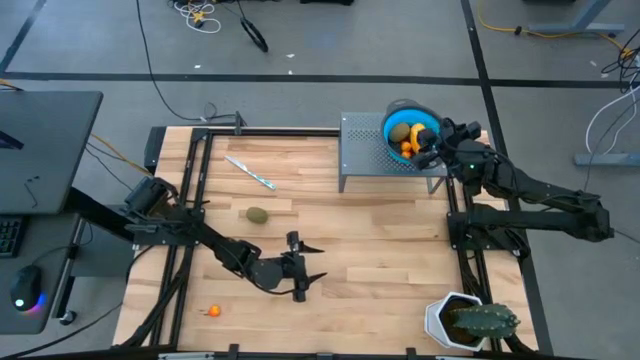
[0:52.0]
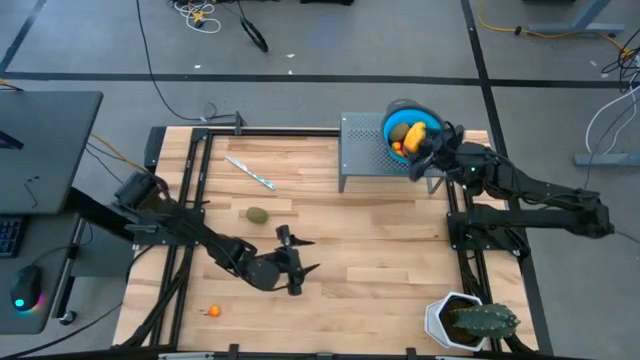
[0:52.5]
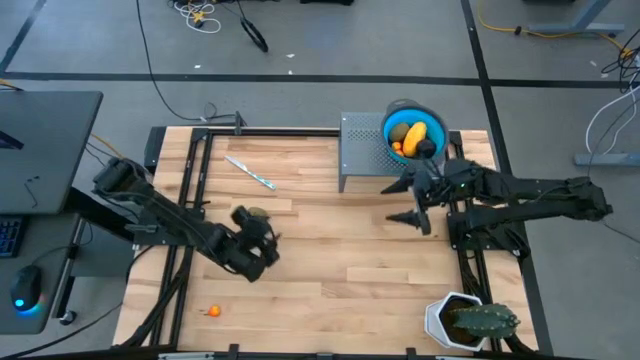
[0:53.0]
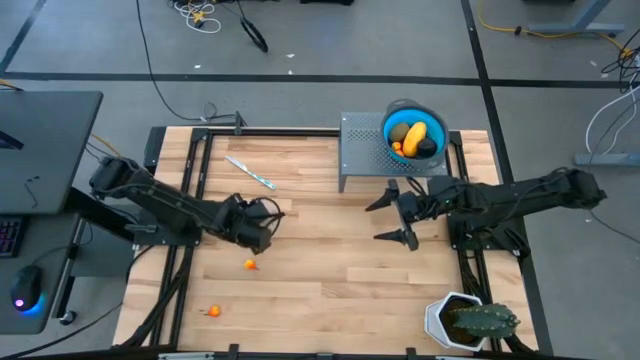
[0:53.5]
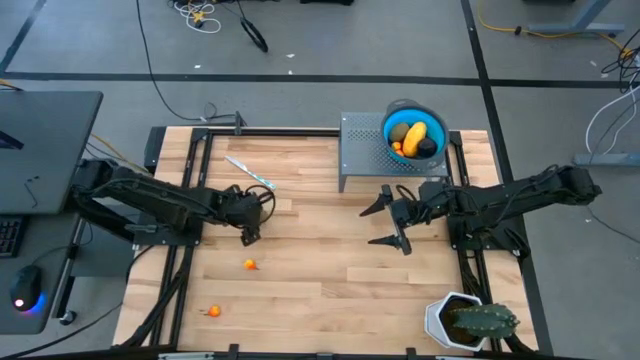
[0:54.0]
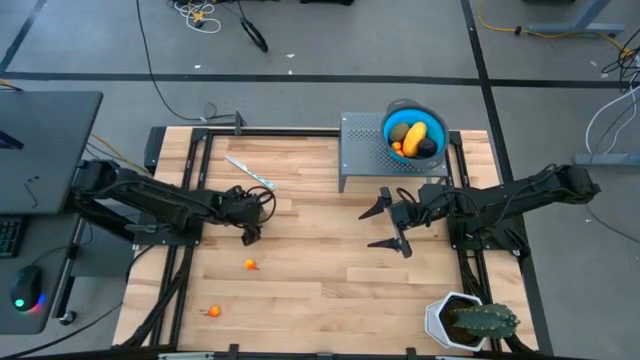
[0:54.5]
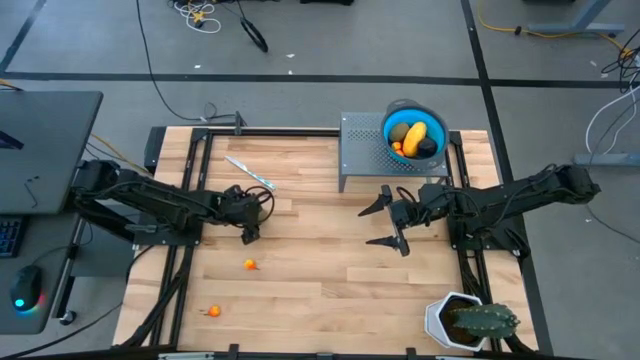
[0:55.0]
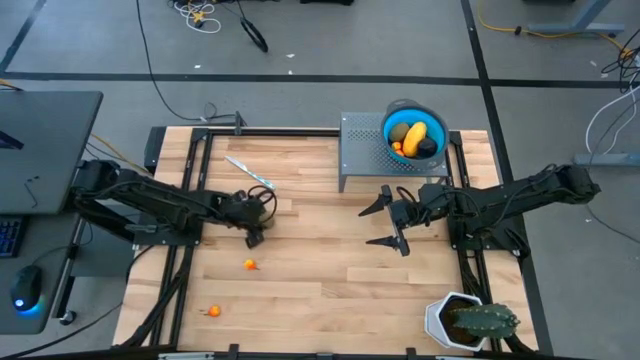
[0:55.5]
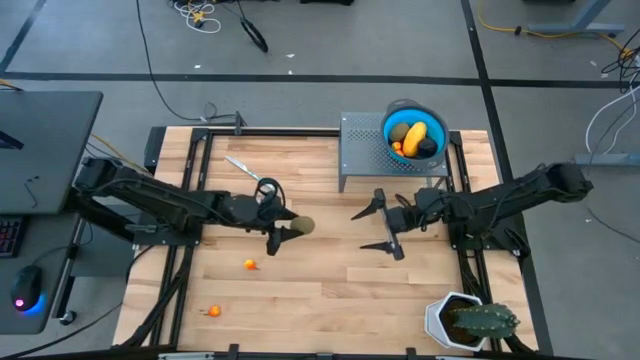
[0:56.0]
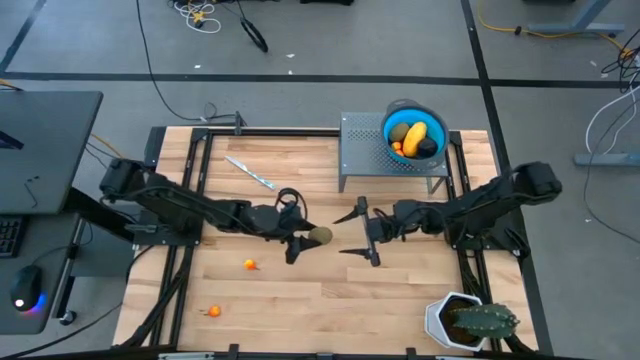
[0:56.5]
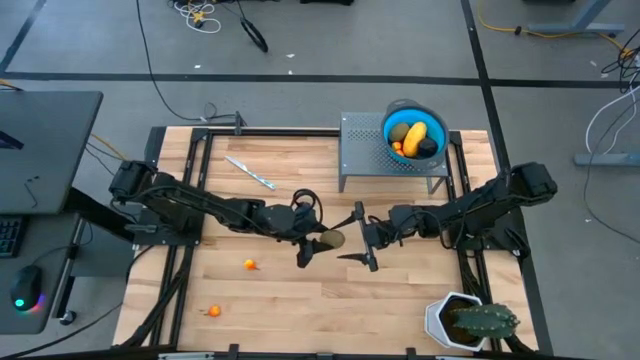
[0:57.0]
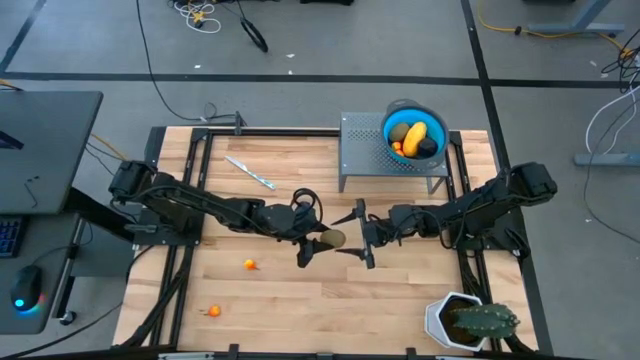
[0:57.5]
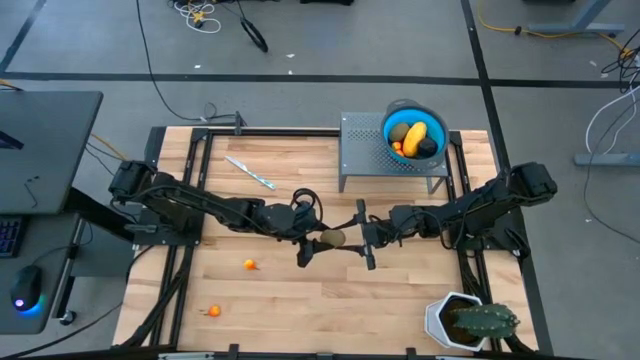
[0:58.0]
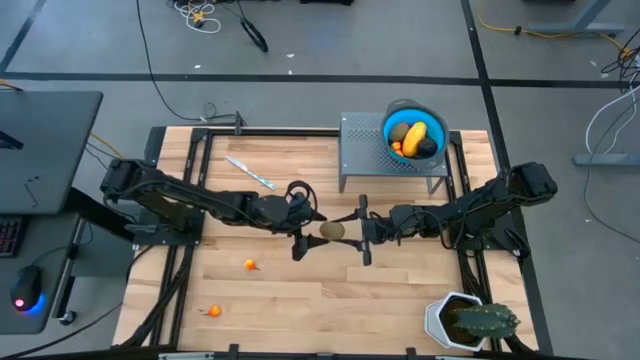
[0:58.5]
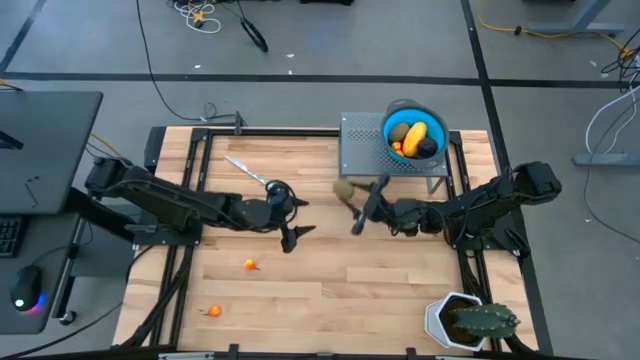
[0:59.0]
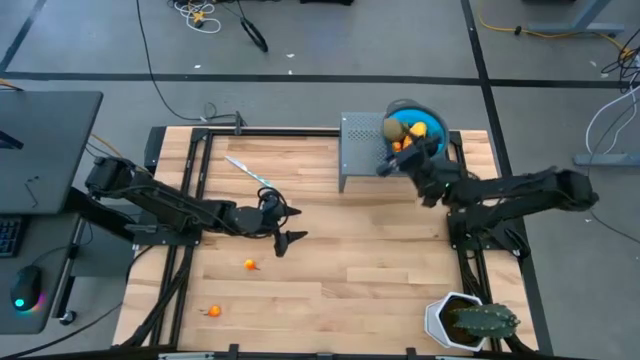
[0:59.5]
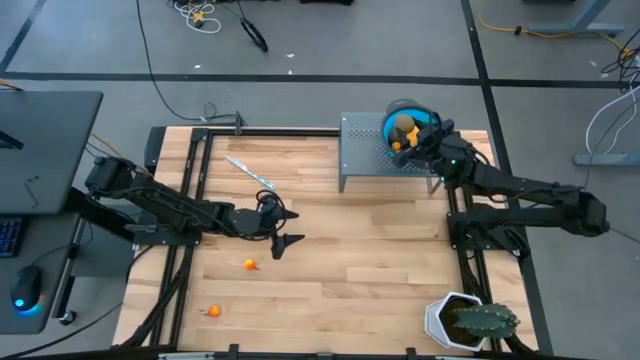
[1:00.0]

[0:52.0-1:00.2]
Task: Pick & Place Fruit
Put the brown kiwi into the blue strainer bowl on the shelf

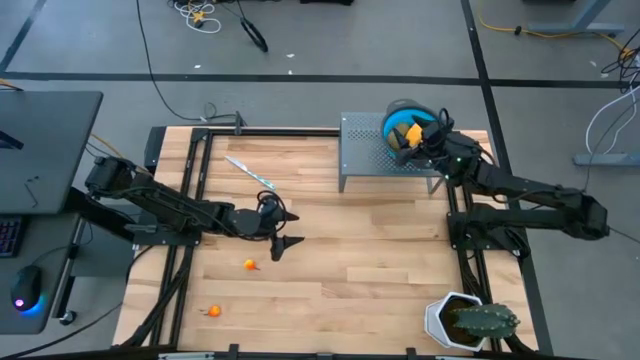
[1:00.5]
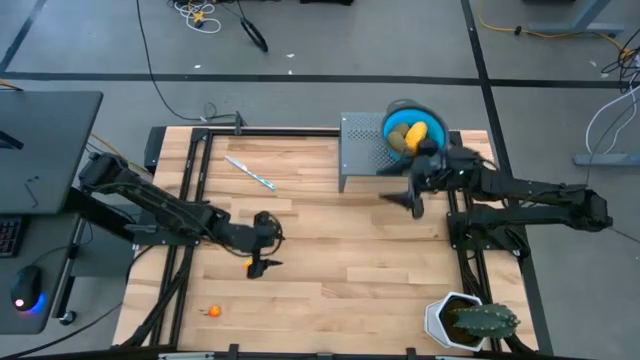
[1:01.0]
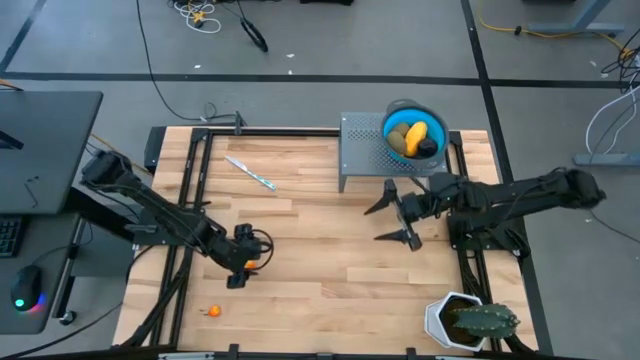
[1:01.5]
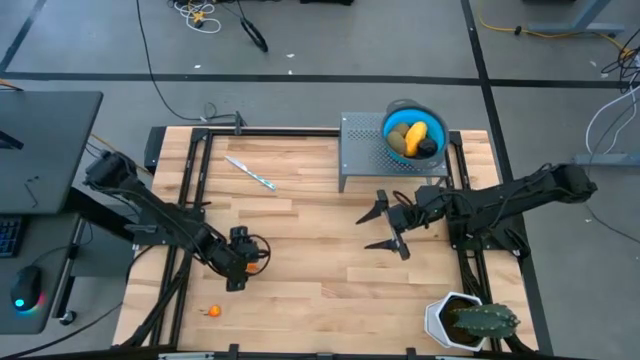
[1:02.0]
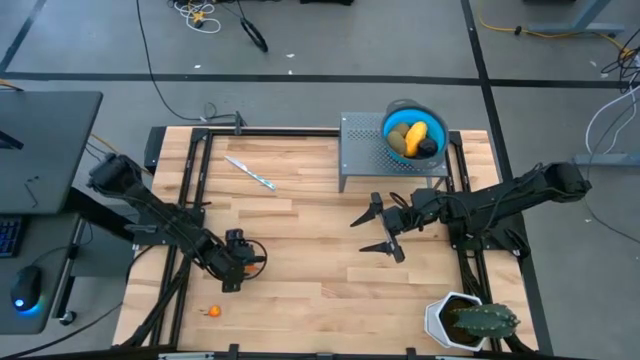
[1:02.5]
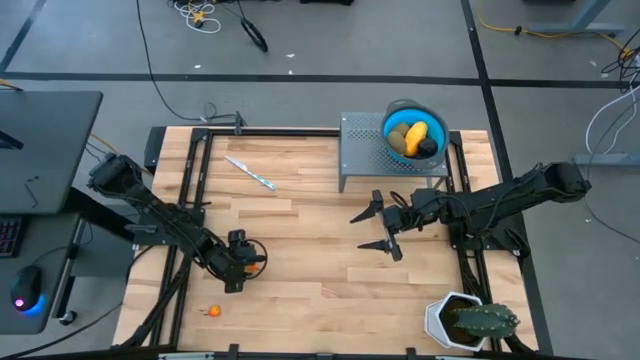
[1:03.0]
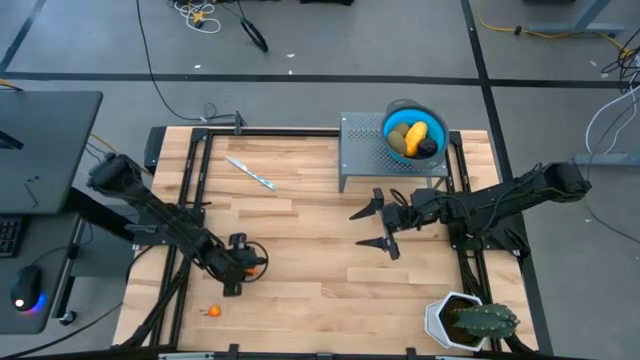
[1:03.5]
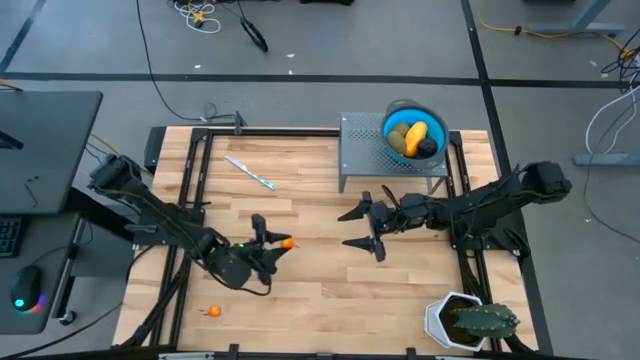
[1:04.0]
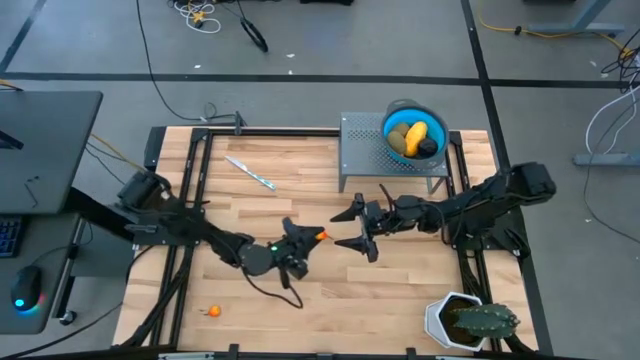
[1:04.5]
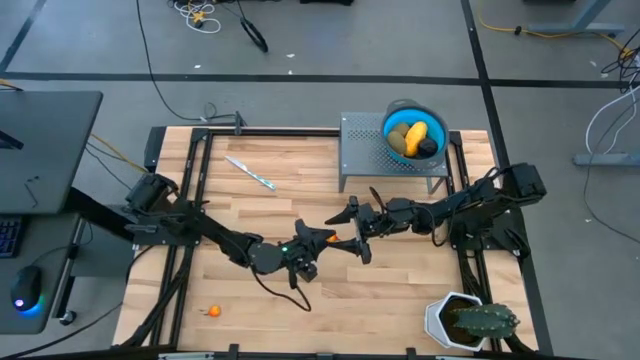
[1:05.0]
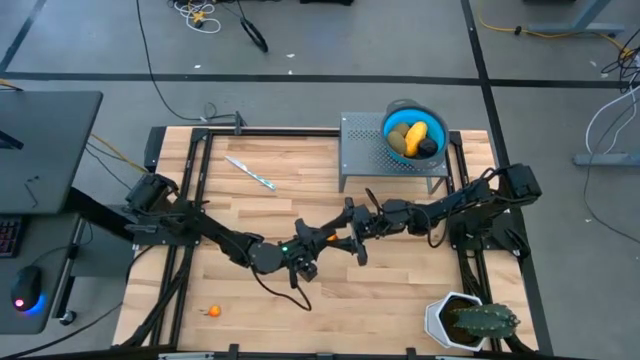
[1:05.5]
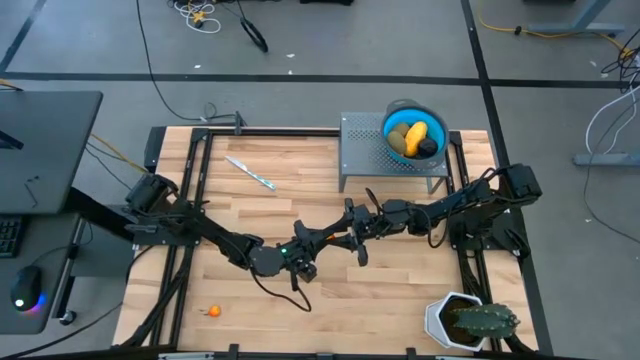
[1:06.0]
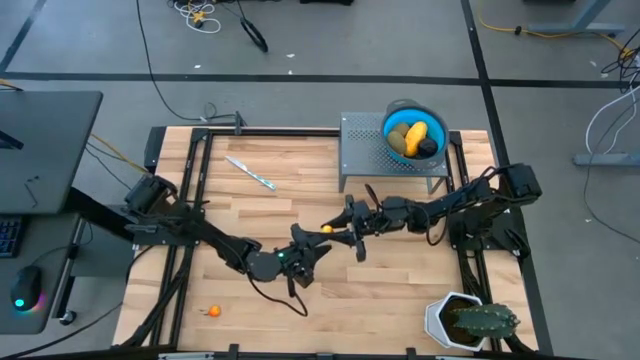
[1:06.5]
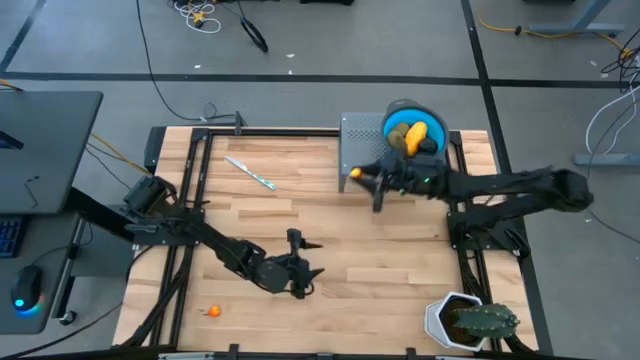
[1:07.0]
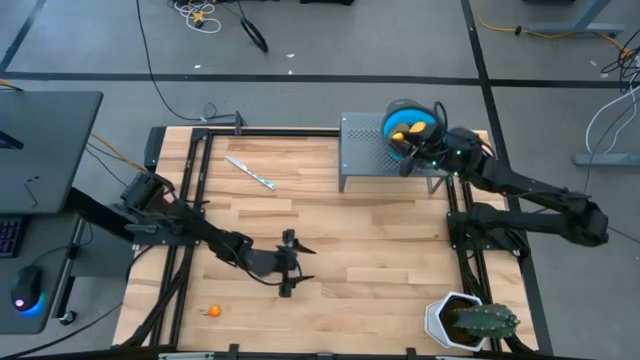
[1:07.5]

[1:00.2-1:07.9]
Put the orange pear into the blue strainer bowl on the shelf

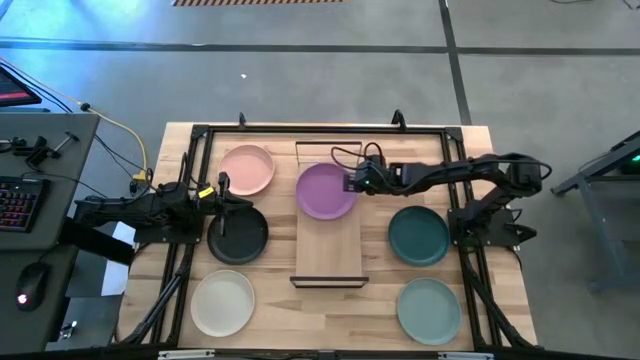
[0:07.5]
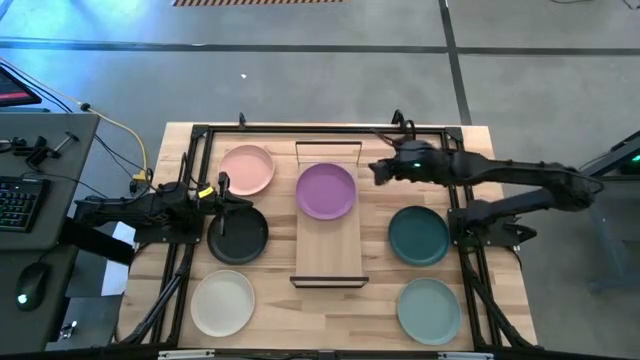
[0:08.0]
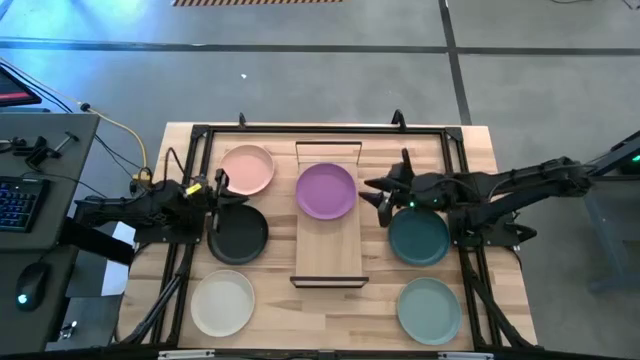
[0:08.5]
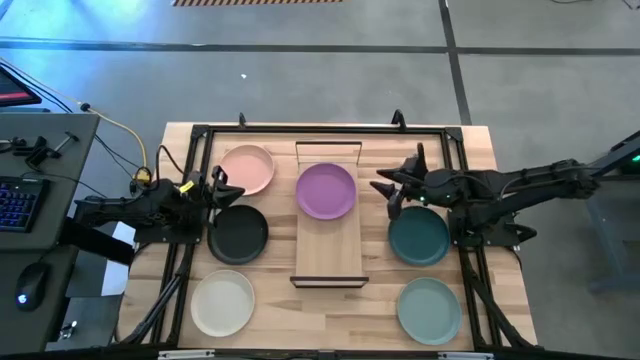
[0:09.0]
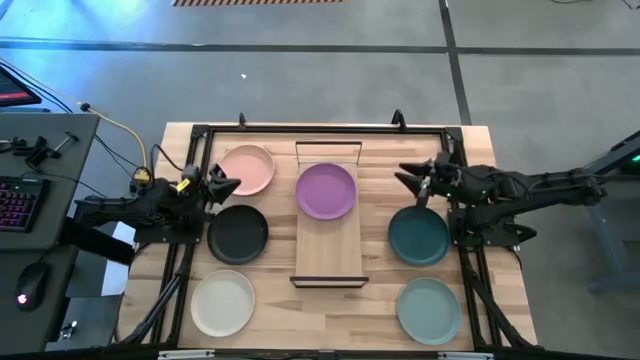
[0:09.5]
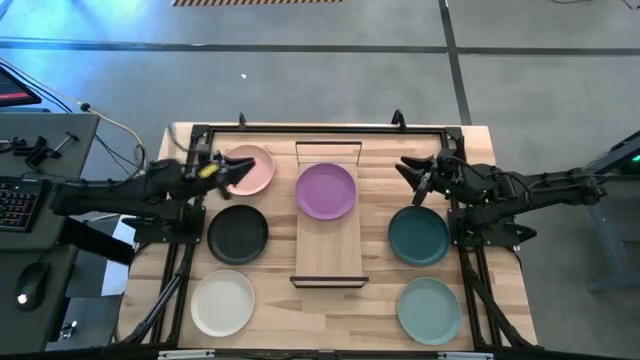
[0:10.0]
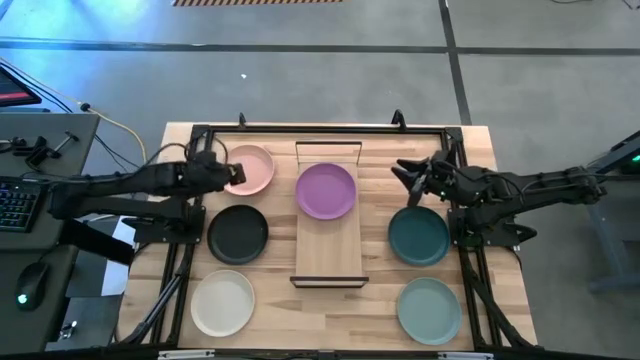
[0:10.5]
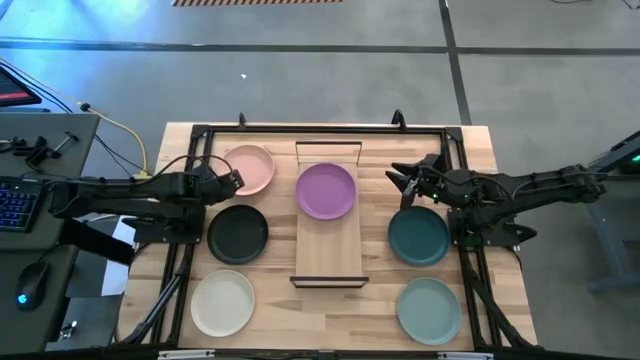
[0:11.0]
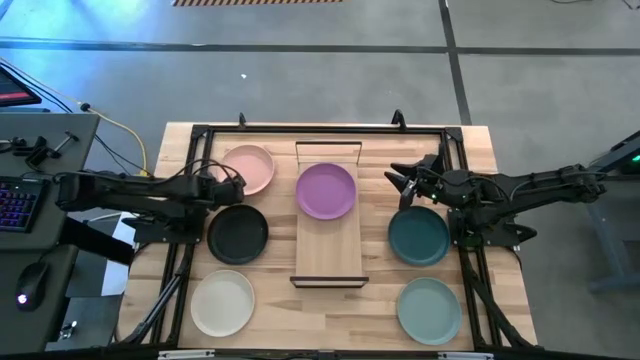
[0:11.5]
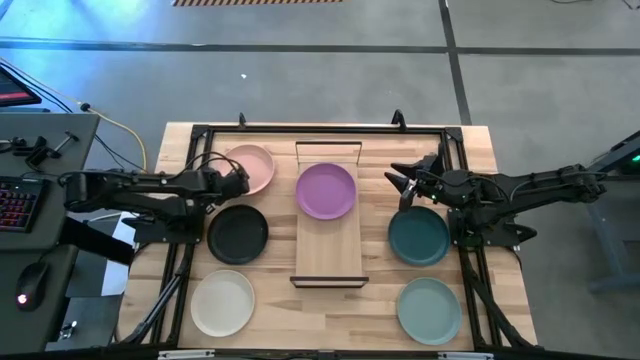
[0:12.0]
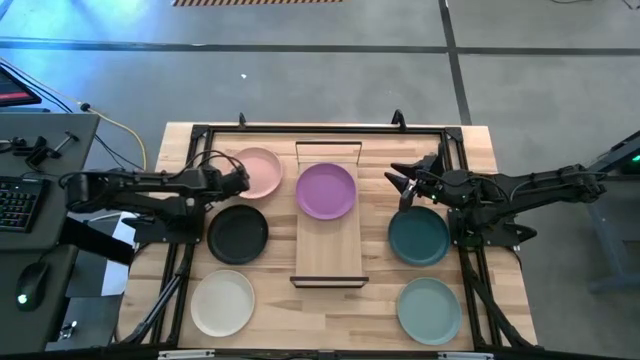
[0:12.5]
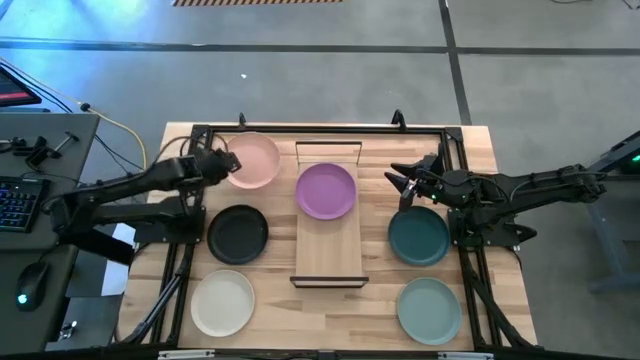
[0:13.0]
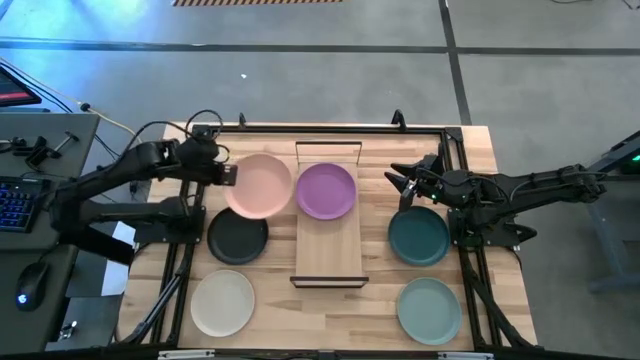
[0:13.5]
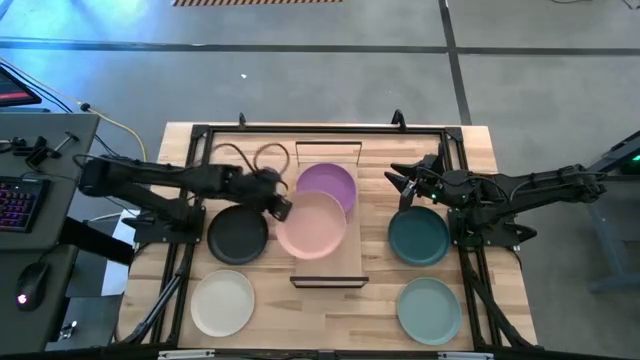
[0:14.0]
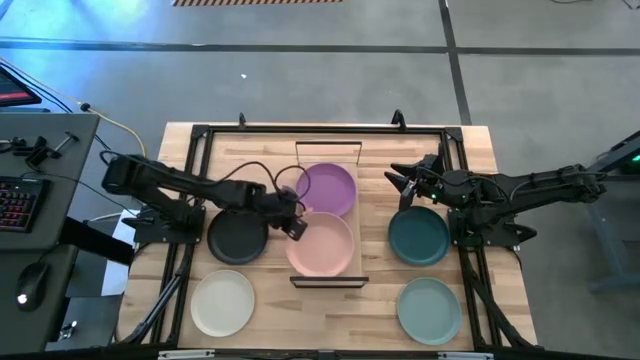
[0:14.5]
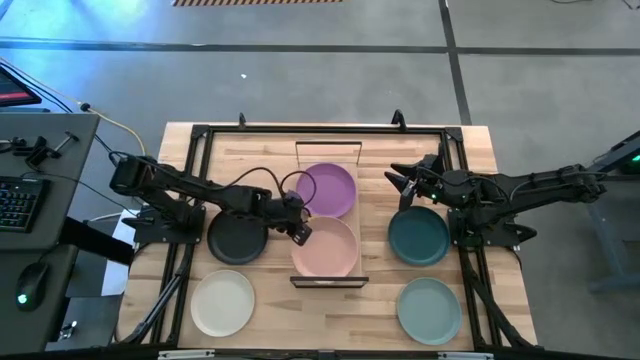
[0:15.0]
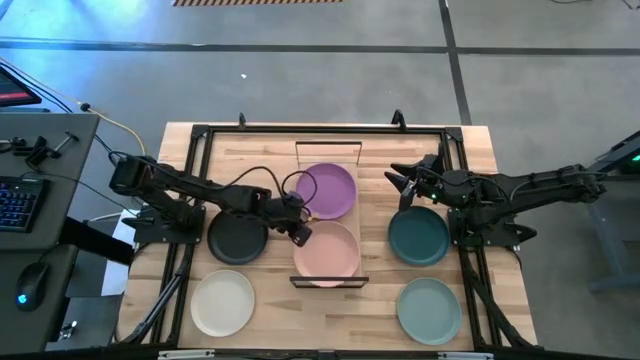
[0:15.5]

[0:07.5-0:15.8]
Task: Place and stack plates onto a shelf
Put the light brown plate on the shelf
